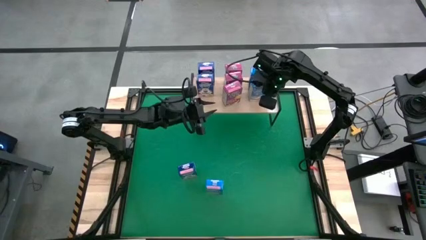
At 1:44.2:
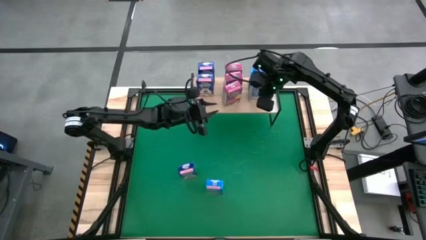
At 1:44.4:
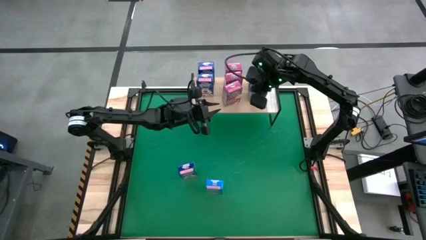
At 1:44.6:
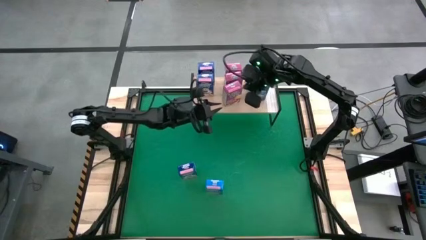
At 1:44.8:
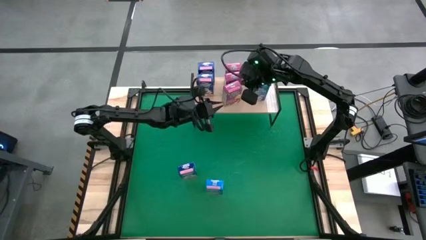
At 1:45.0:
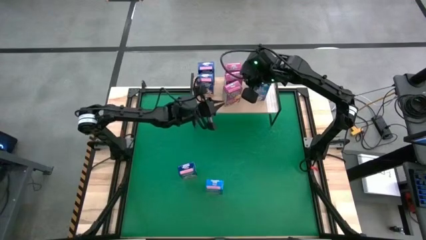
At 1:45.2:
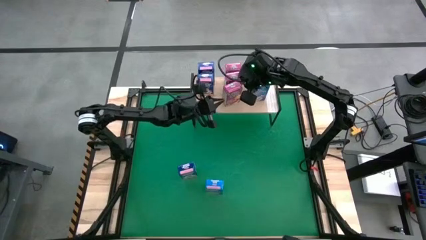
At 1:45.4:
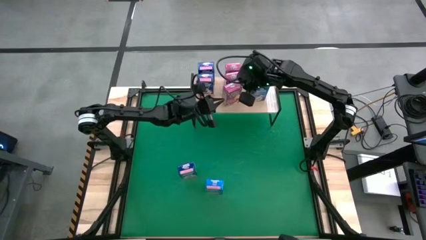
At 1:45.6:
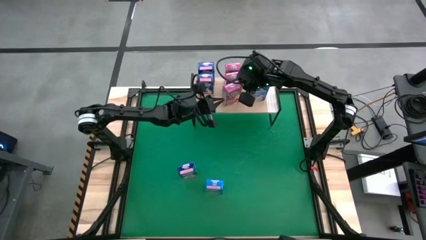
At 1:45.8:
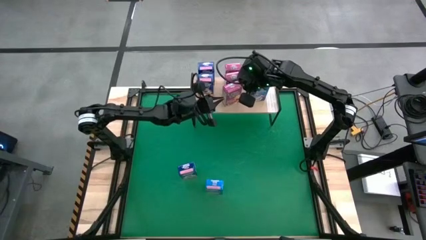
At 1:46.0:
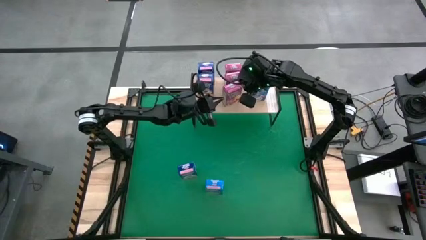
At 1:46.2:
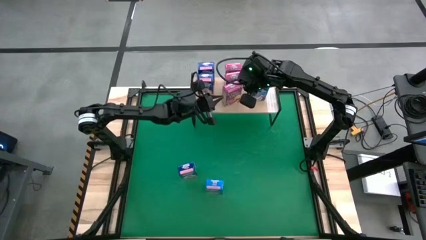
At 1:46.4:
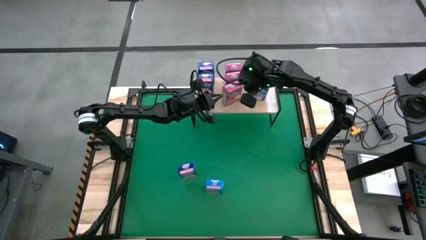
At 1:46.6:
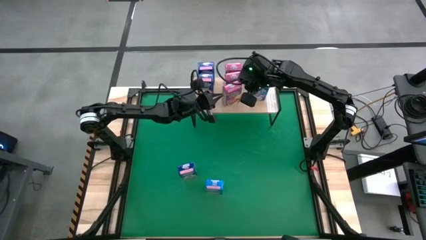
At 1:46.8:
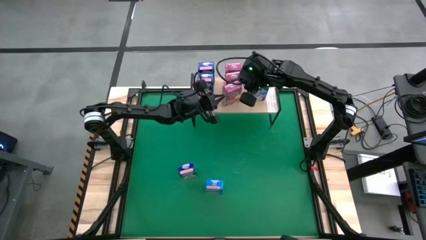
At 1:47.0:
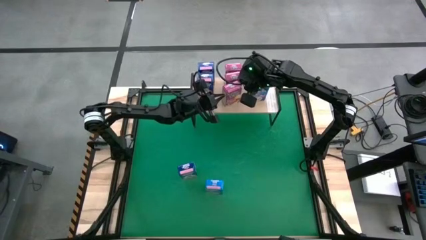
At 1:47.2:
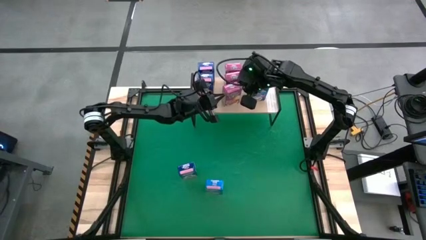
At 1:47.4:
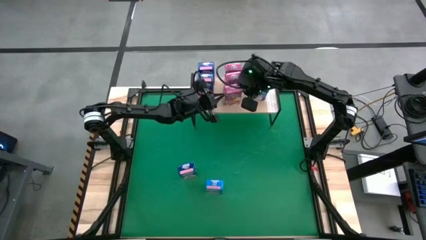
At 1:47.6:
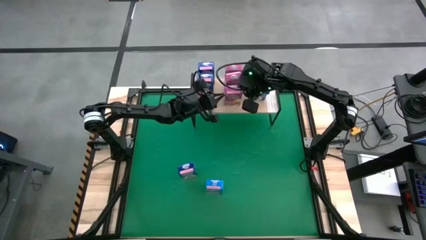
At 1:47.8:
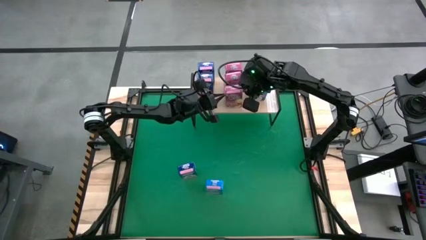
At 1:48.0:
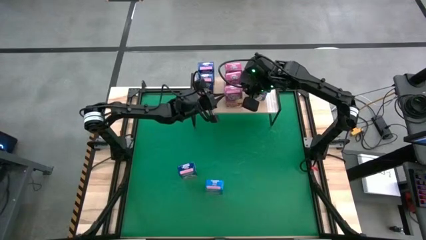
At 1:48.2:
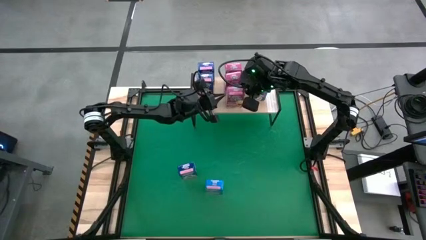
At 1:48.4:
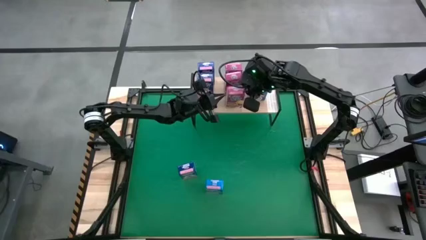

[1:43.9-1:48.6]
Task: Stack cereal on shelf
Adjust the pink cereal box on the shelf

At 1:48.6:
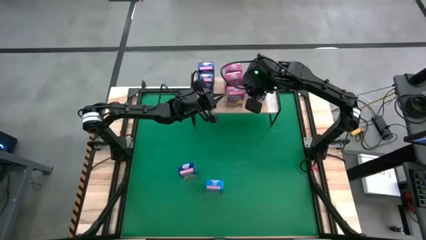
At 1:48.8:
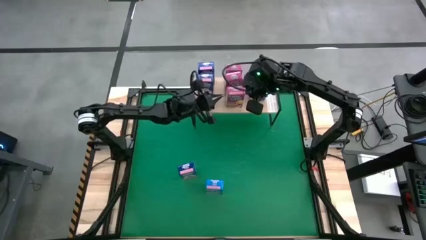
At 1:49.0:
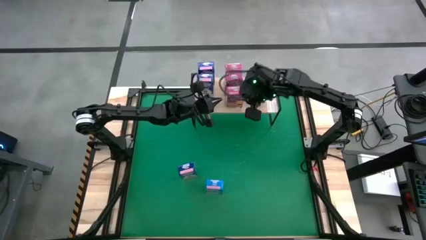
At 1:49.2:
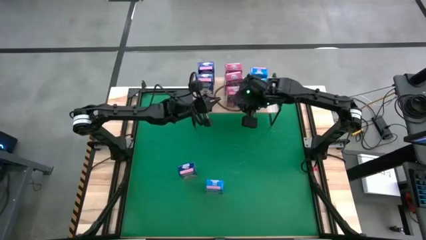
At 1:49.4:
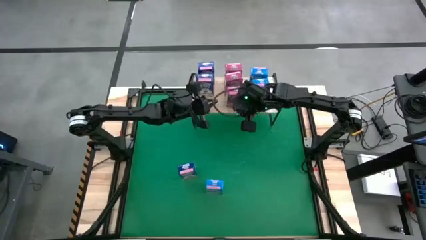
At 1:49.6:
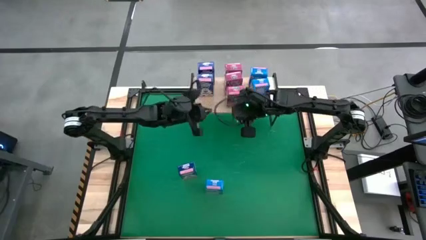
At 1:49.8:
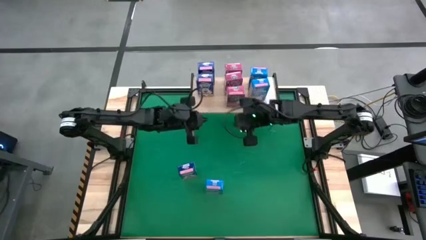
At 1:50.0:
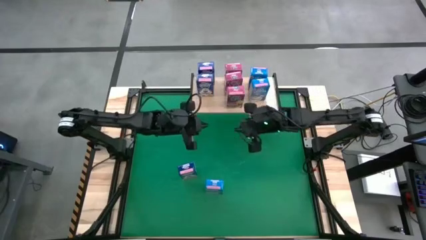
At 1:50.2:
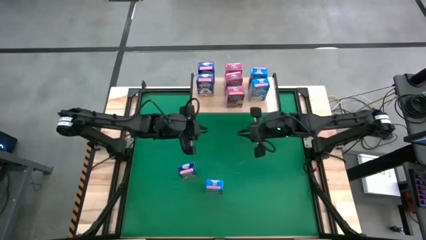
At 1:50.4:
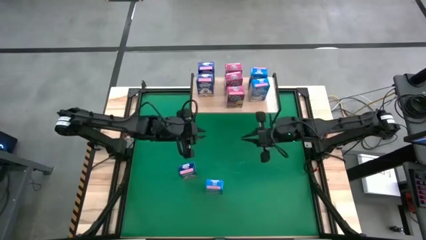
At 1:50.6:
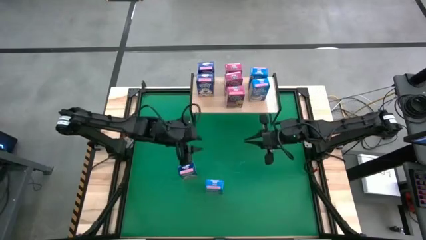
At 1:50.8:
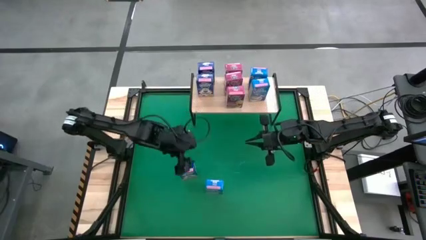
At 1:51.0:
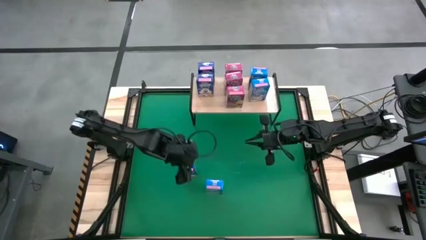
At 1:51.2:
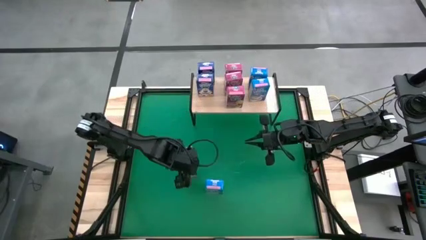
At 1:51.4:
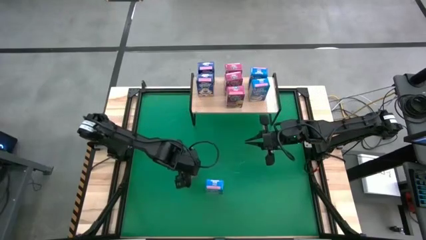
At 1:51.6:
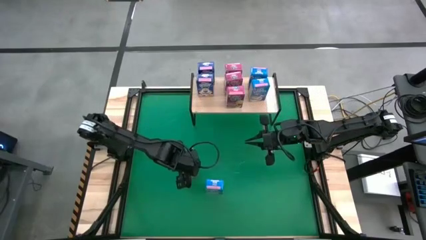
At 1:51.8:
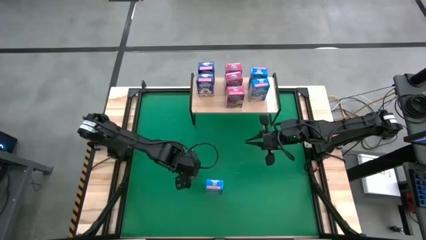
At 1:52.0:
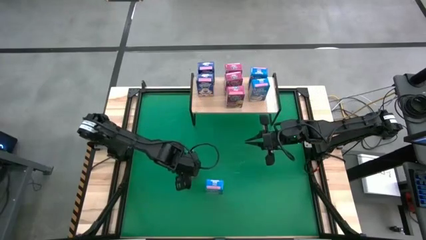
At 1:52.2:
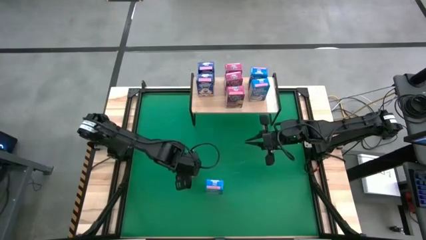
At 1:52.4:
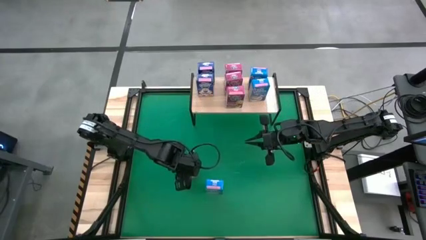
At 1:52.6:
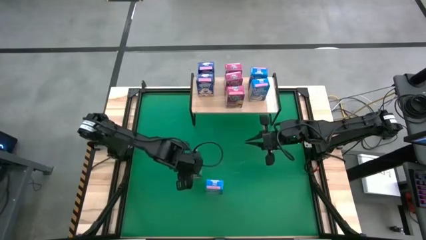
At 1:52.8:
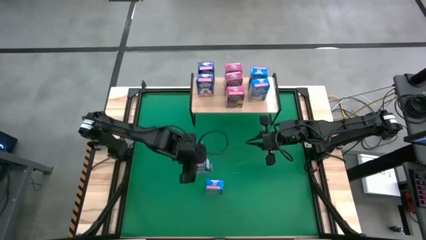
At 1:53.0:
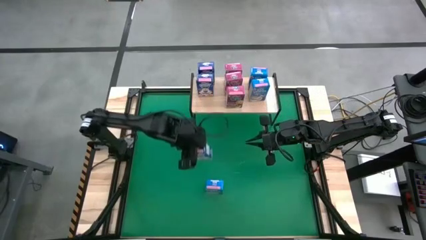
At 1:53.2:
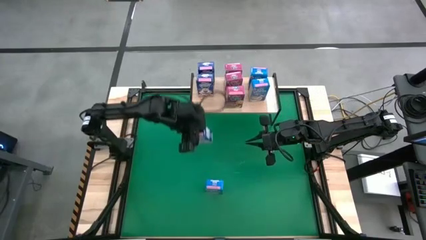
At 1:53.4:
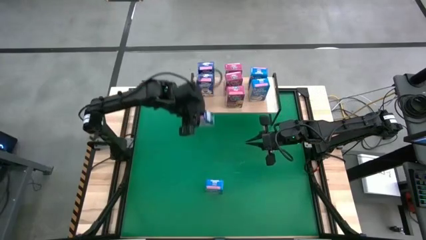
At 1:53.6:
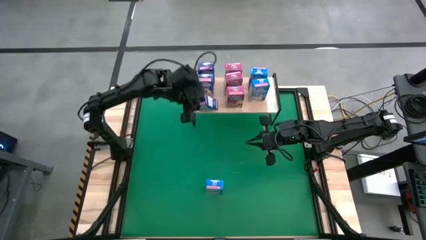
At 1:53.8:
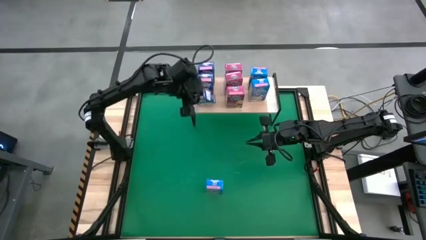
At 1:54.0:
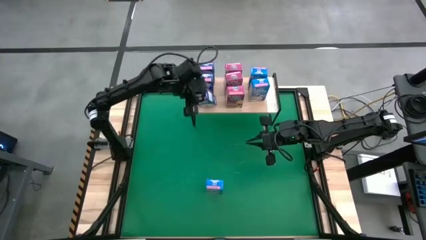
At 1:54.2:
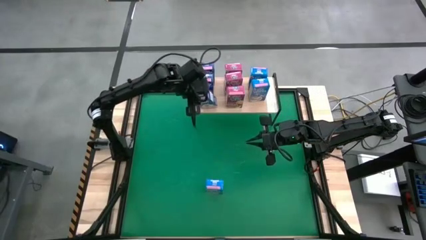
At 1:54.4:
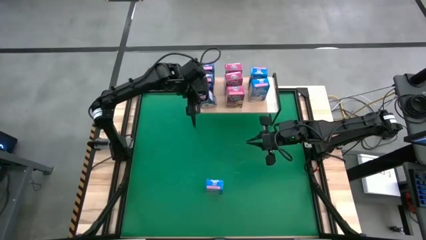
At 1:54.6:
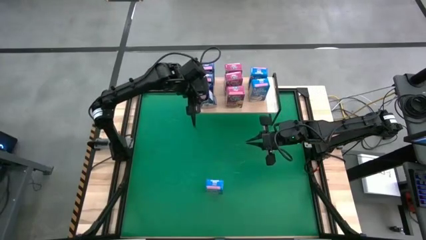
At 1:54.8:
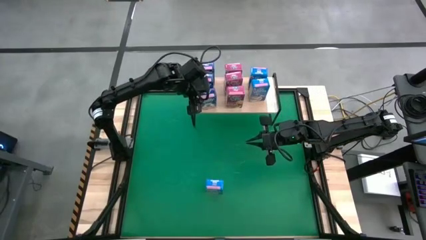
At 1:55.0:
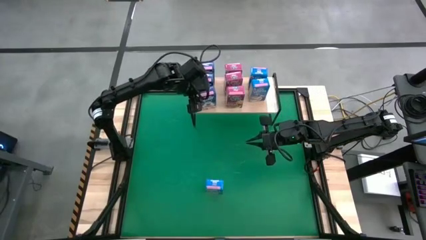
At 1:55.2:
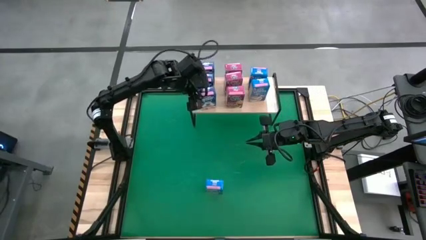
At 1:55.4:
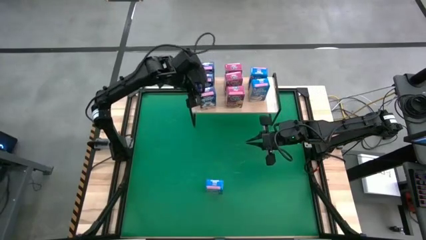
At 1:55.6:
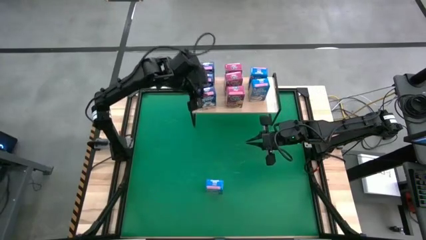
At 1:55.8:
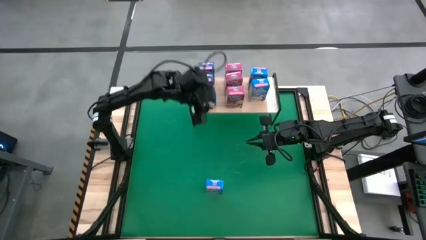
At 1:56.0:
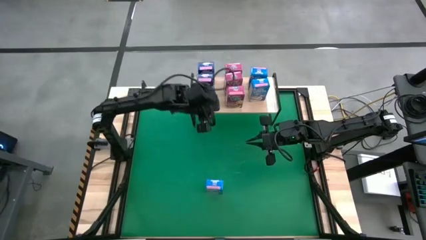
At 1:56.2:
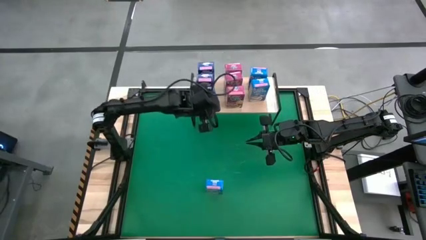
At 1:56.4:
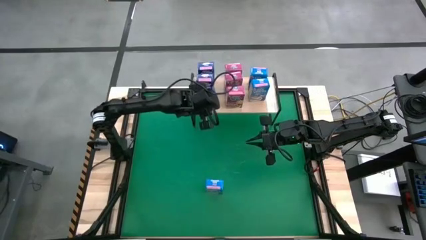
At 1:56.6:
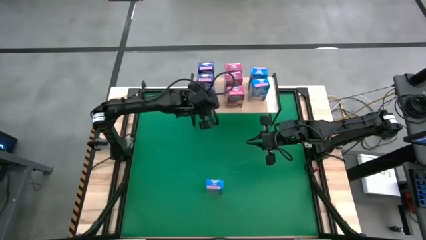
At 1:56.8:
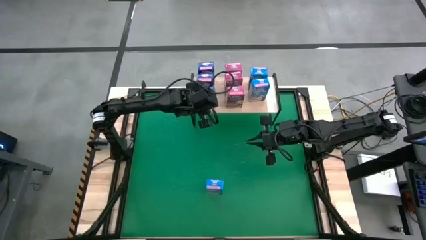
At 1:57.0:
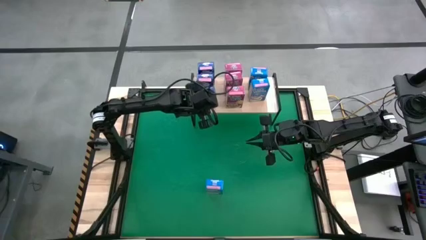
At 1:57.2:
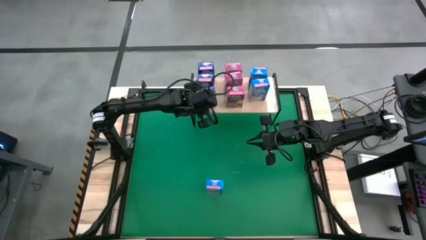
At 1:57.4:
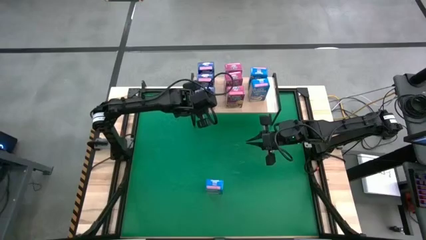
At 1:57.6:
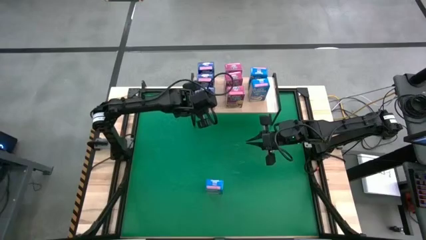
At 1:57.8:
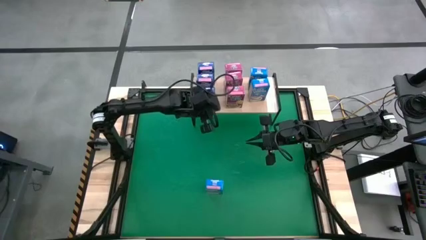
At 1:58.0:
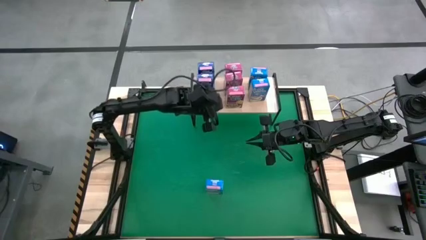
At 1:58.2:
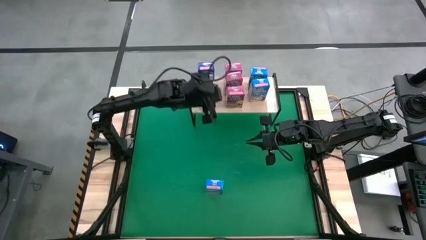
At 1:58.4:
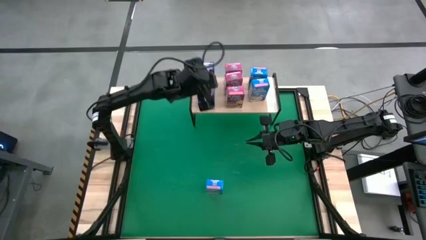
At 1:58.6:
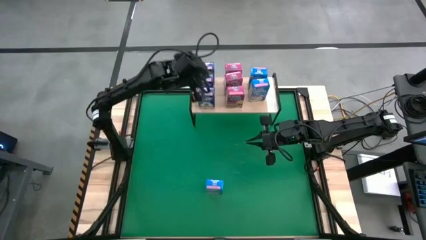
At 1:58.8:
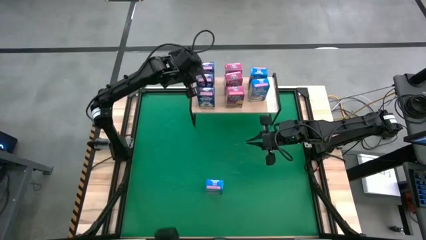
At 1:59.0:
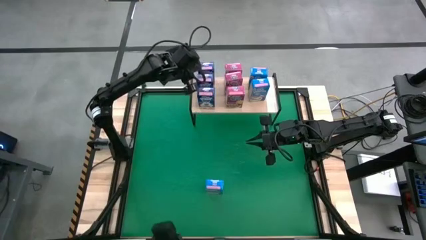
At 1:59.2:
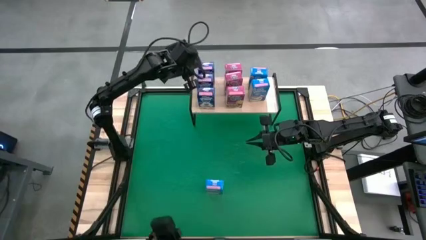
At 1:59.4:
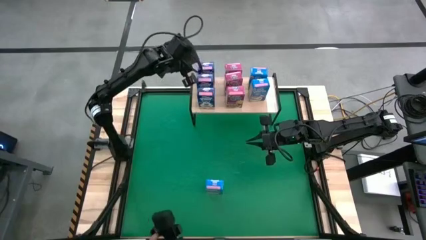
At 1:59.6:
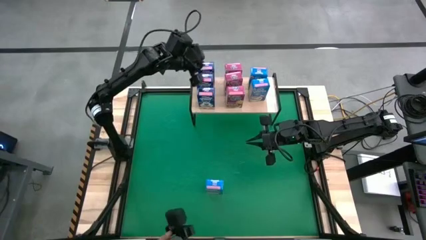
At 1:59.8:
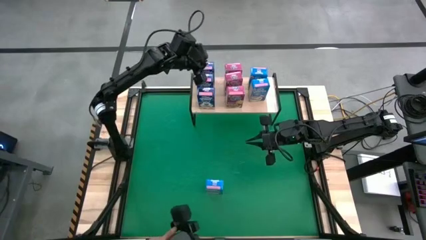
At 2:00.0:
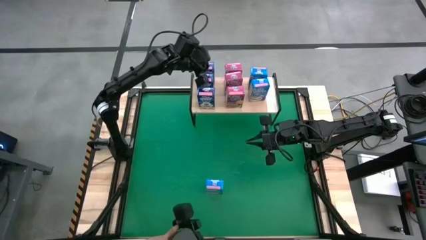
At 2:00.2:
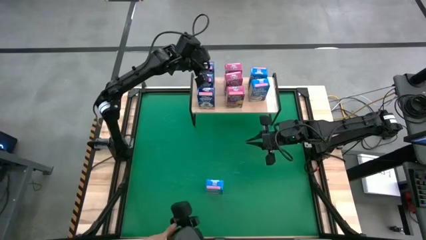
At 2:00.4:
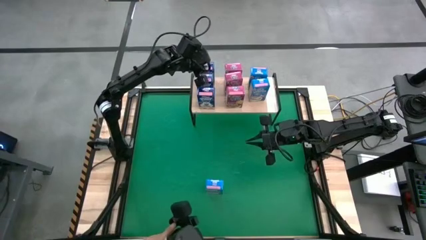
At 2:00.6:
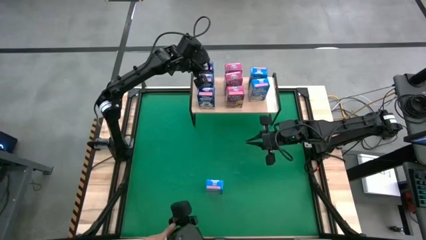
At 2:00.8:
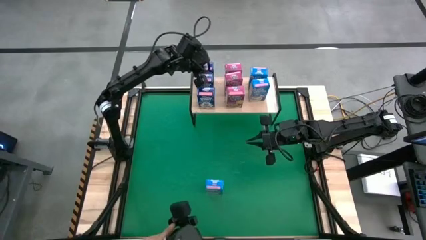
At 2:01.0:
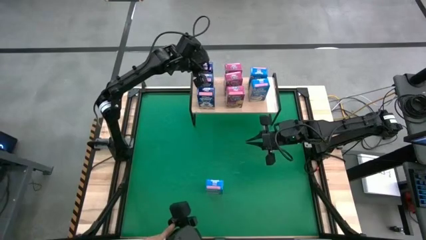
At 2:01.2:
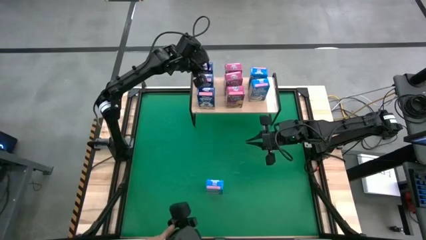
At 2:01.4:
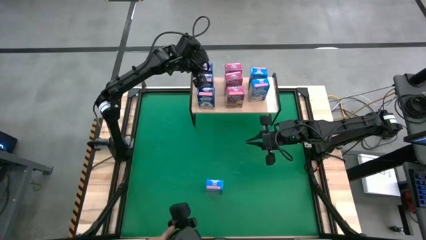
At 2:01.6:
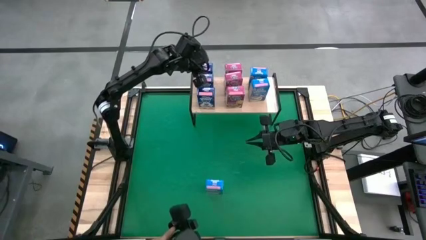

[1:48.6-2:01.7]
Put the blue cereal box on the shelf
